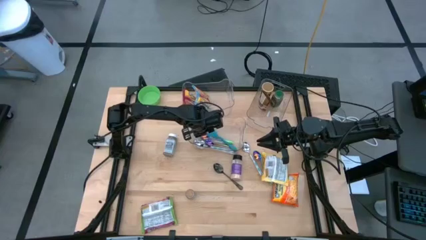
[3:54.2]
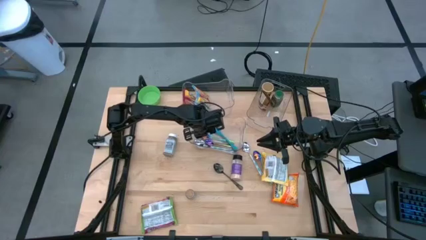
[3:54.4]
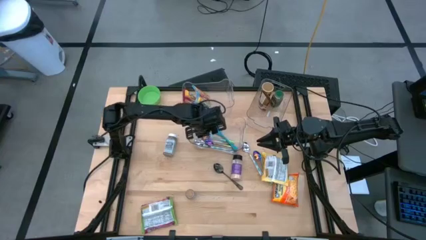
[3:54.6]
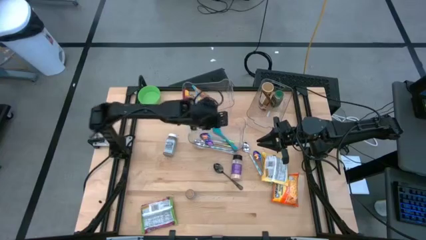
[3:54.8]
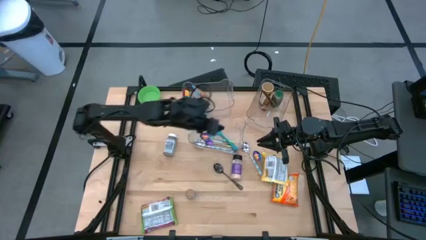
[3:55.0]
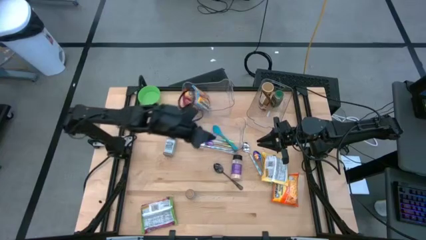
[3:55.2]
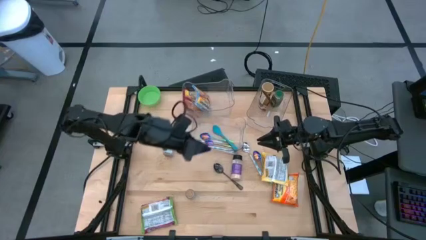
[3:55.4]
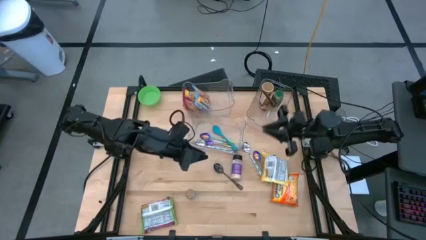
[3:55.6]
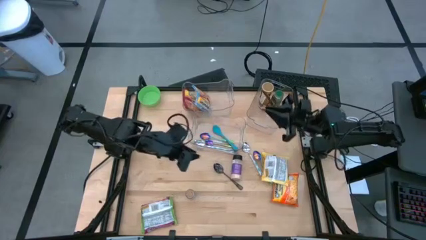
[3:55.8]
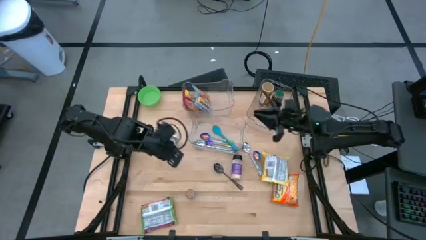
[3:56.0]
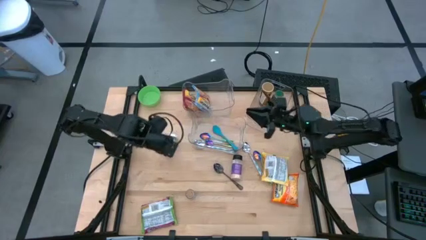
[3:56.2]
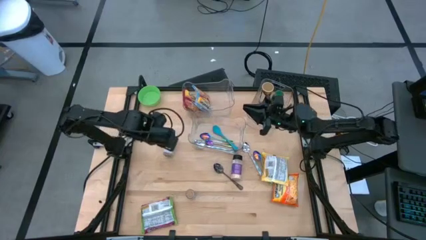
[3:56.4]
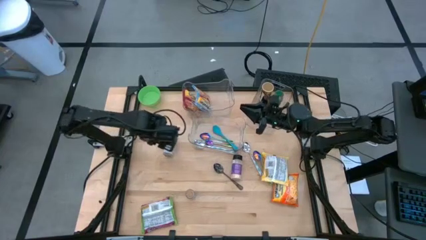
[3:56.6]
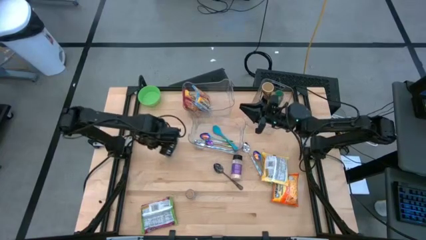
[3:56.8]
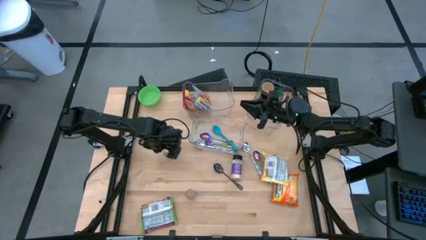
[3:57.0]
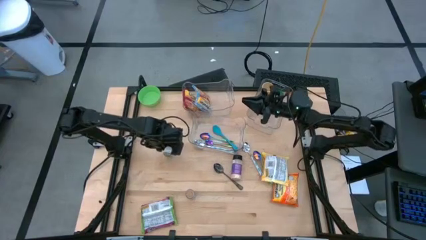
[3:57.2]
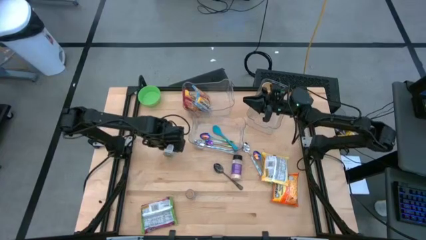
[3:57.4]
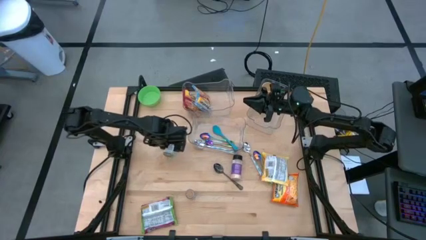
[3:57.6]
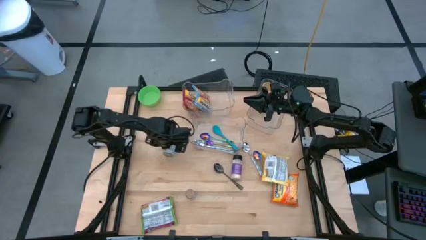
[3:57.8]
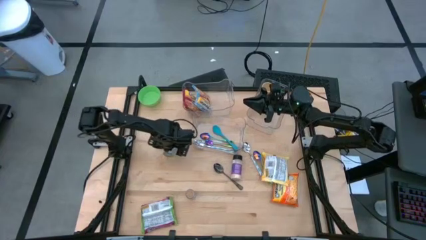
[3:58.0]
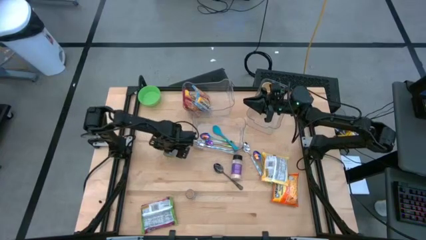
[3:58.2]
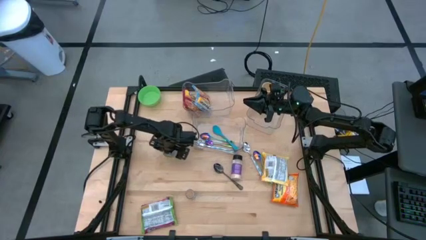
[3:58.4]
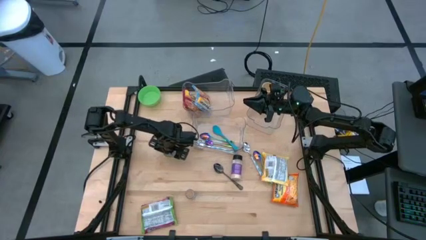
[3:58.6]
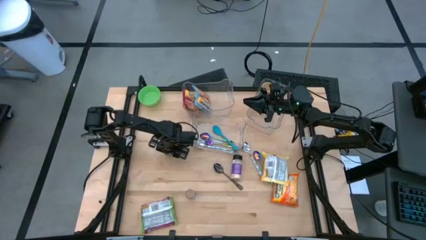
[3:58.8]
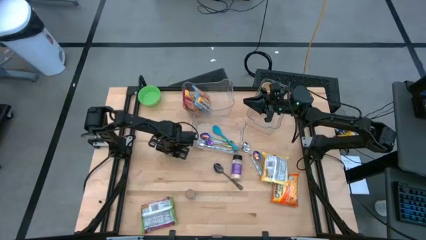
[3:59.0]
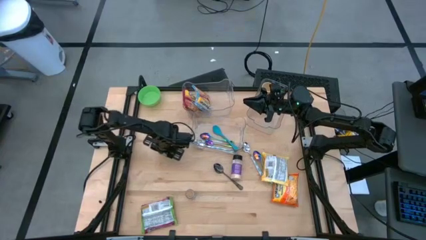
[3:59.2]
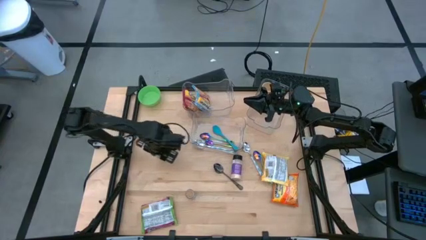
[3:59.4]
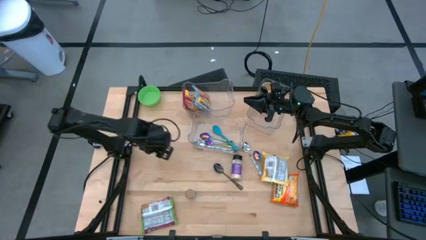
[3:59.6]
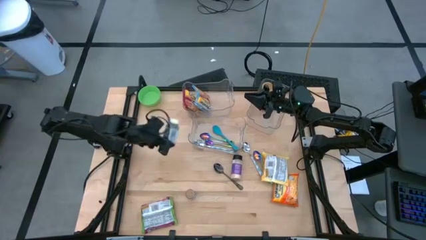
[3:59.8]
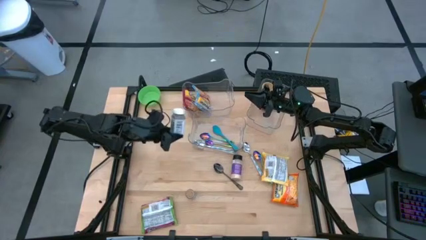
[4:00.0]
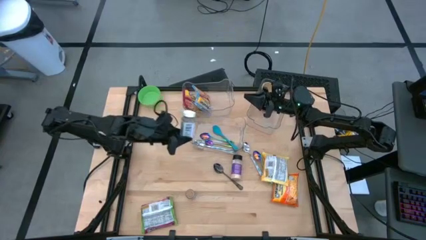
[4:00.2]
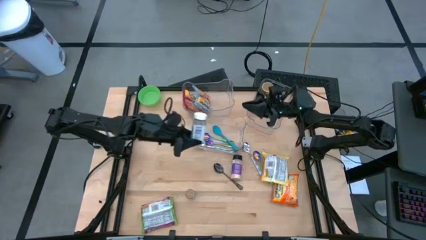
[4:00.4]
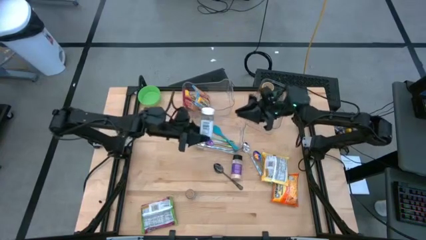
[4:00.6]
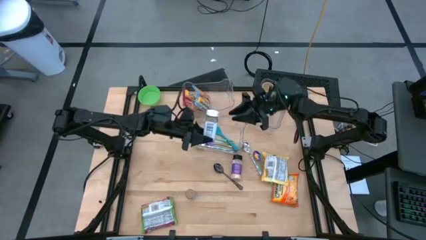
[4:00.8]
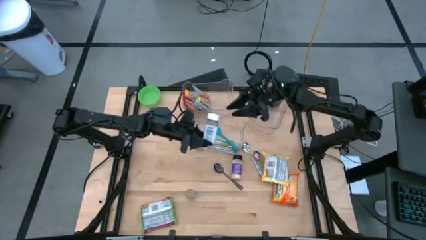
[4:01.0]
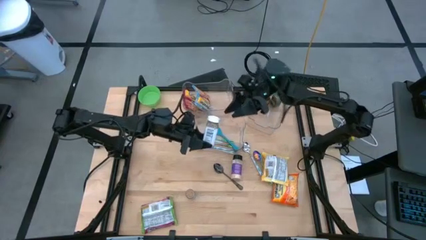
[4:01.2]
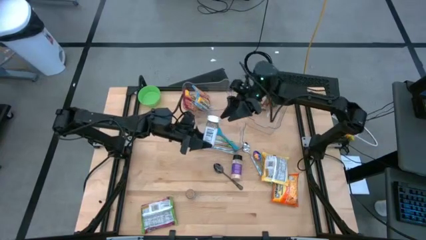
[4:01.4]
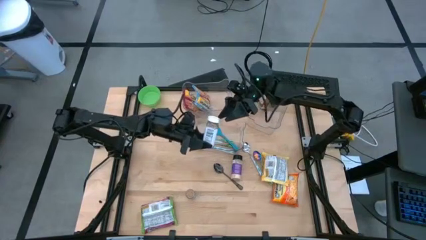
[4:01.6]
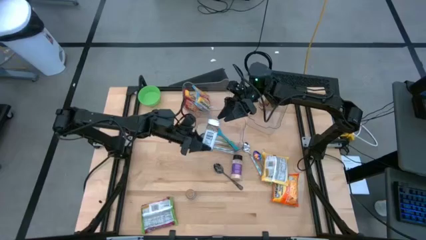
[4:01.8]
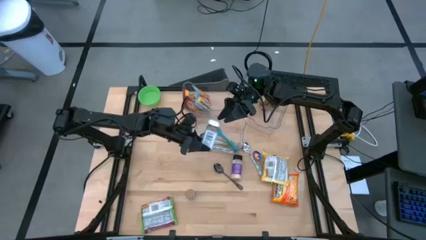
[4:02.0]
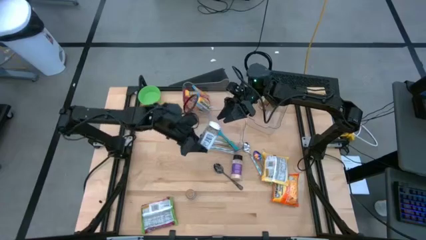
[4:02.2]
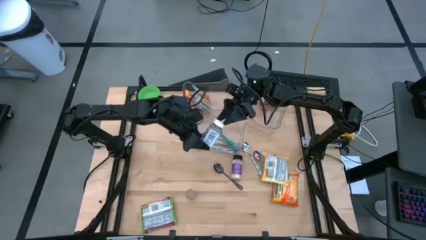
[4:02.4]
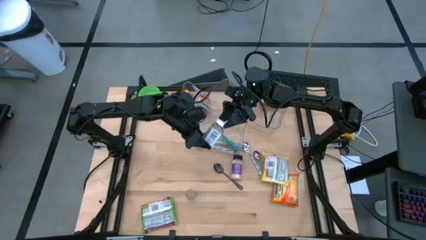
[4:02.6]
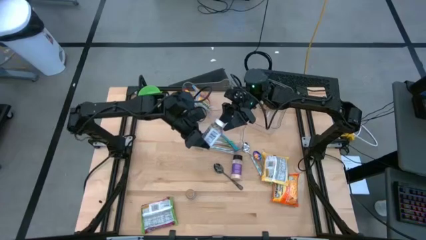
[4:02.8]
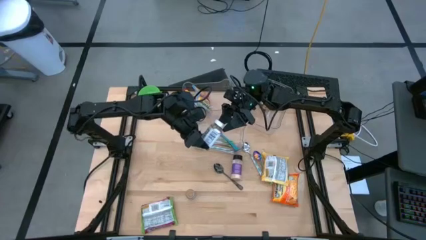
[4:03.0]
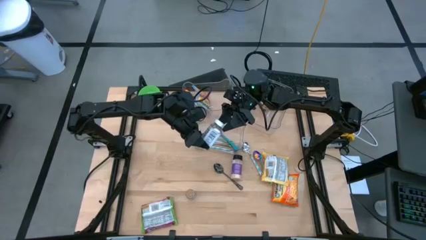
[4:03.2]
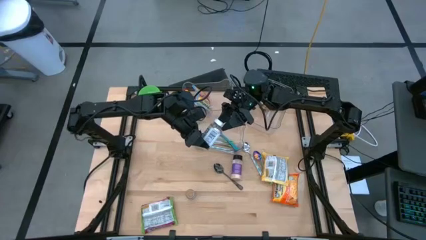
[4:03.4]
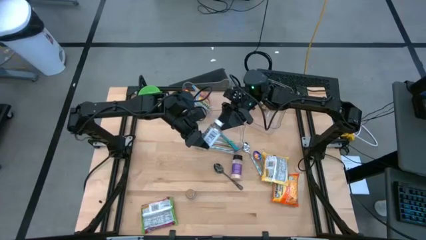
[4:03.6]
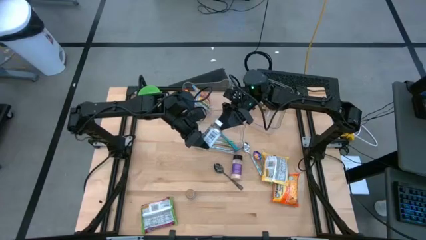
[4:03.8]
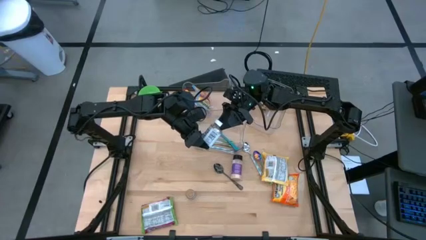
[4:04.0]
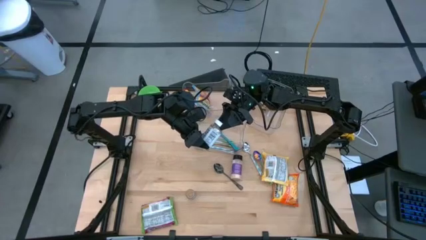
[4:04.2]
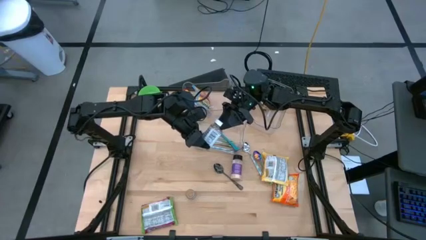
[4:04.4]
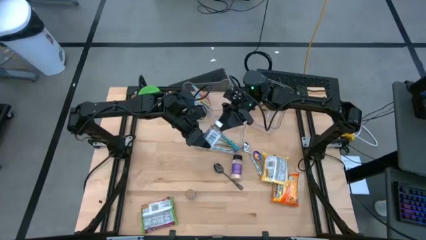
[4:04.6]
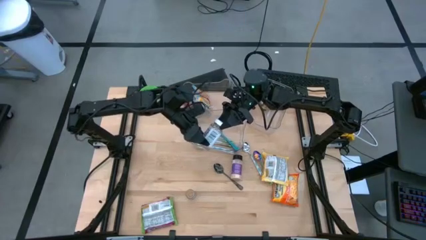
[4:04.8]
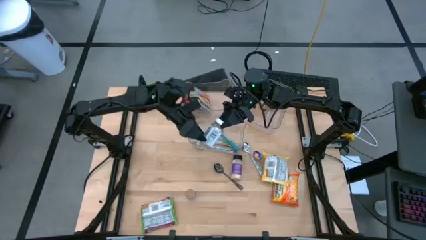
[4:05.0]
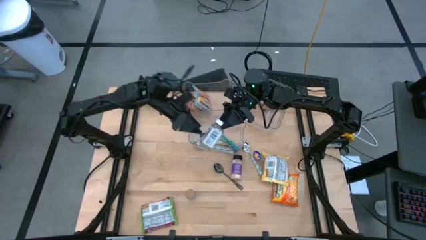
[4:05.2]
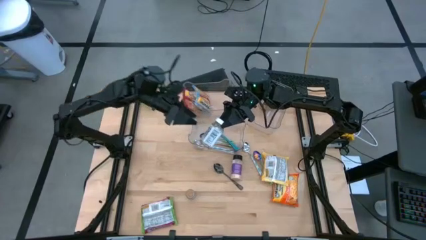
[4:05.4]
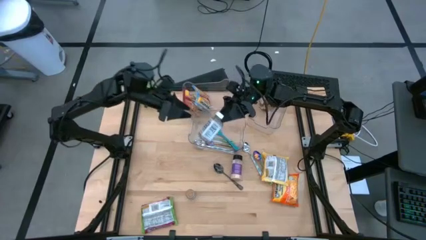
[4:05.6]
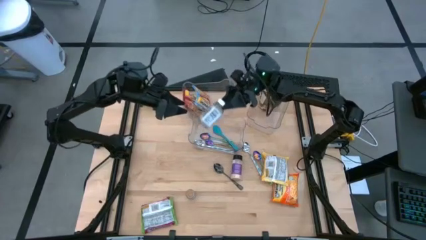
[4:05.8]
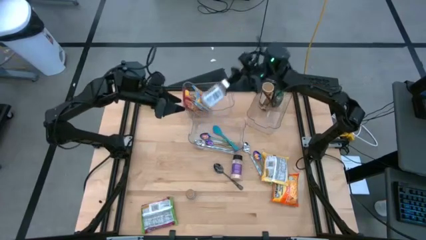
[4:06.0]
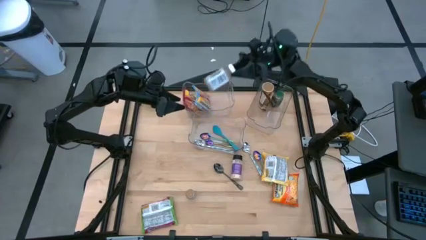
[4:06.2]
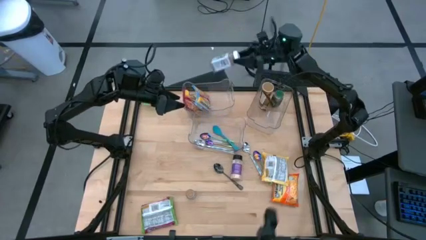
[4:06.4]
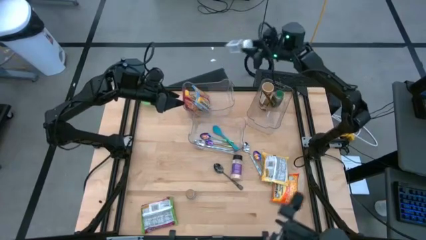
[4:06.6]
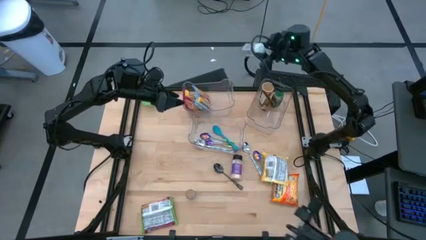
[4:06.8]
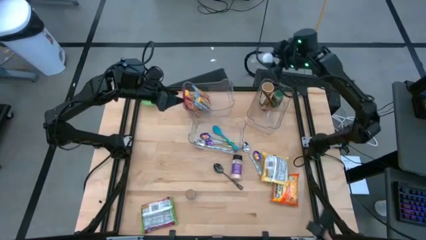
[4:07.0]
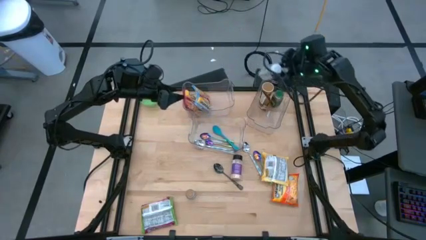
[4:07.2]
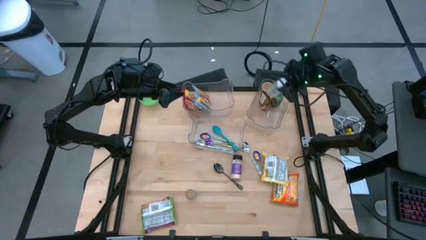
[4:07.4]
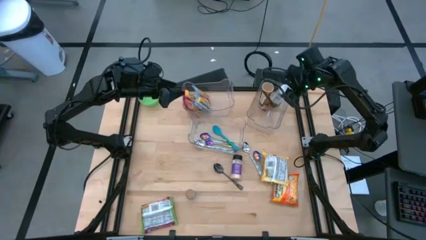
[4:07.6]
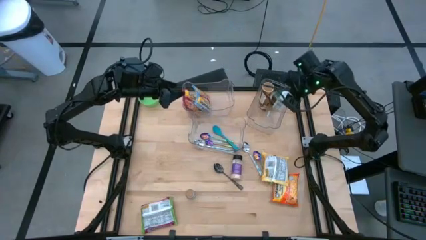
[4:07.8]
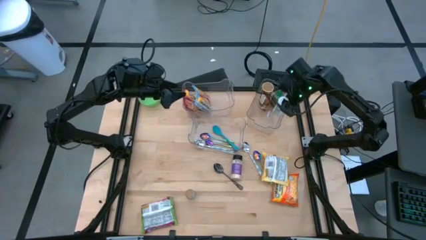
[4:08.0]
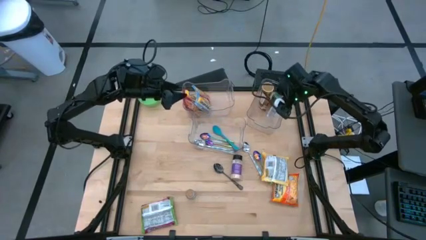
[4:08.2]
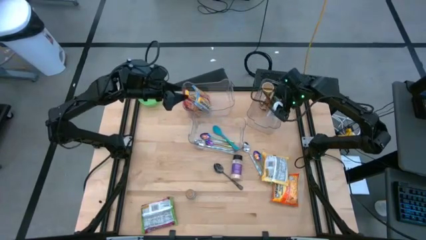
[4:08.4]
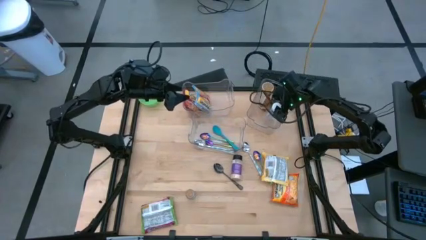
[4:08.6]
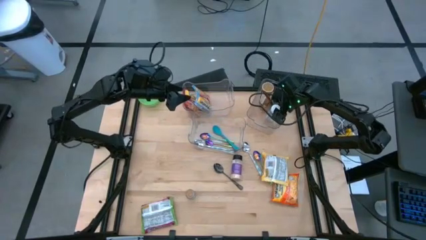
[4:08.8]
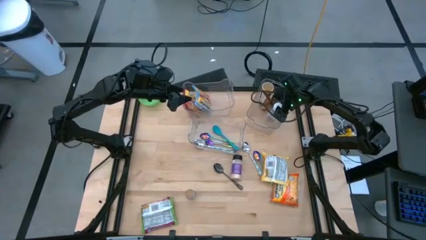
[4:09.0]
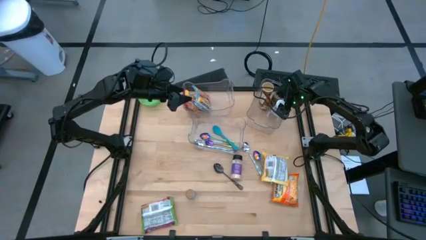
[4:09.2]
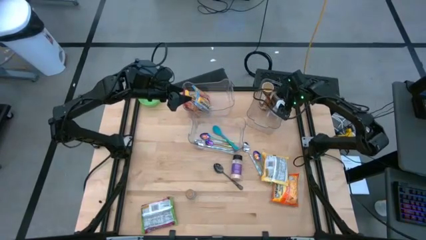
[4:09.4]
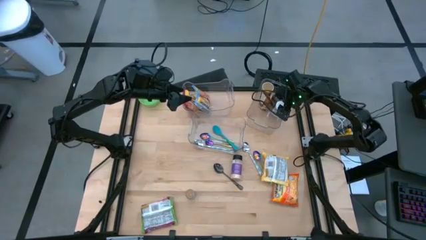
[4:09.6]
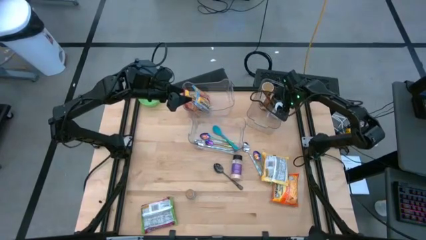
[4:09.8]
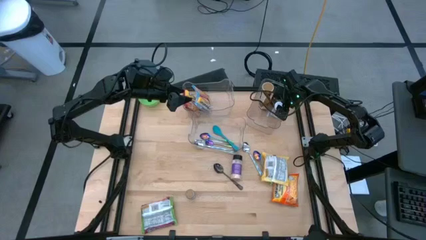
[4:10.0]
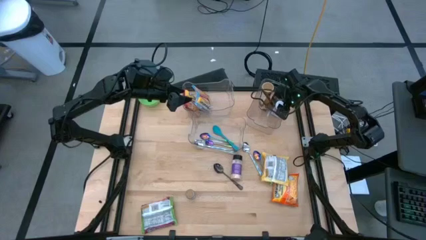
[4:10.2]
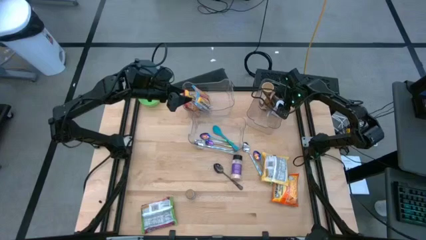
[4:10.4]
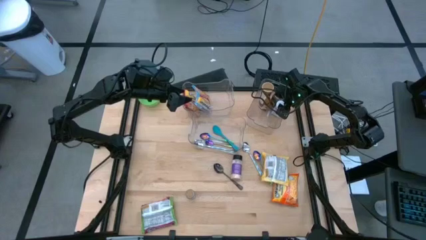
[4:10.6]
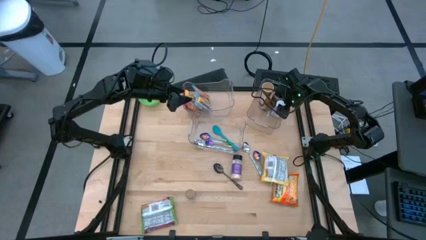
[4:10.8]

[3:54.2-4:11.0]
Task: Pick & Place Food Item
Put the white seasoning bottle into the top right transparent bin
